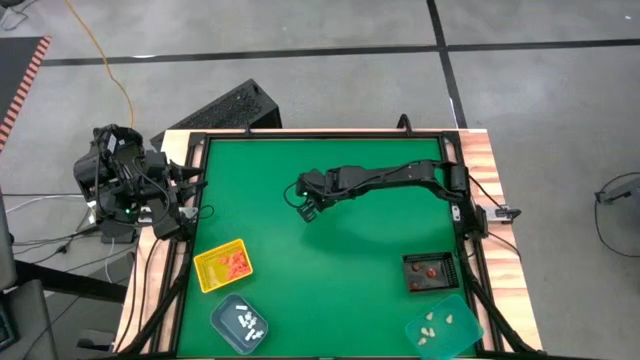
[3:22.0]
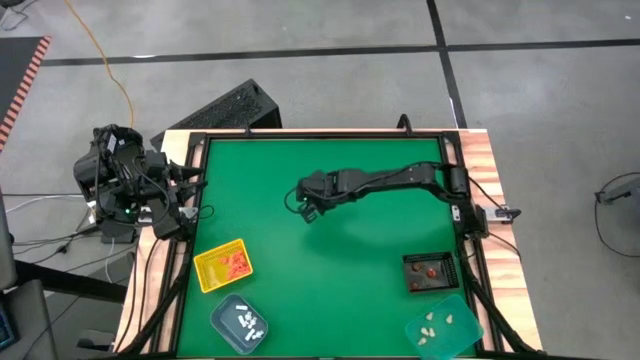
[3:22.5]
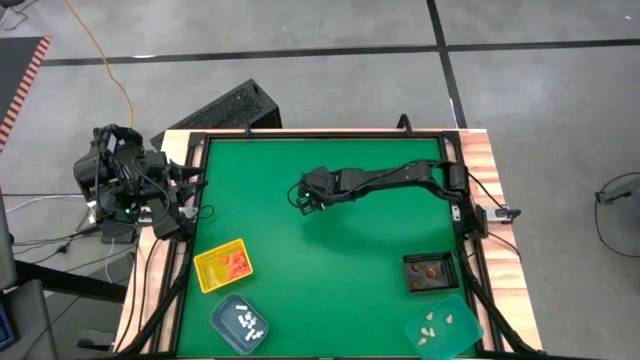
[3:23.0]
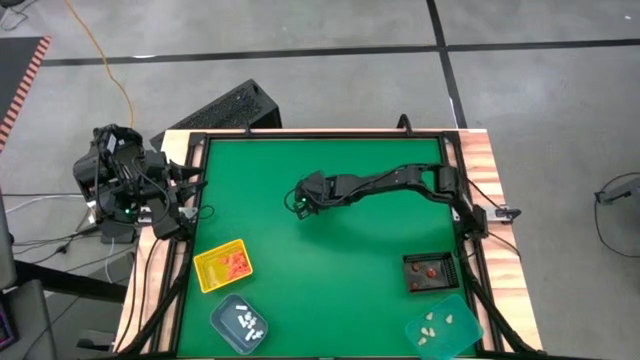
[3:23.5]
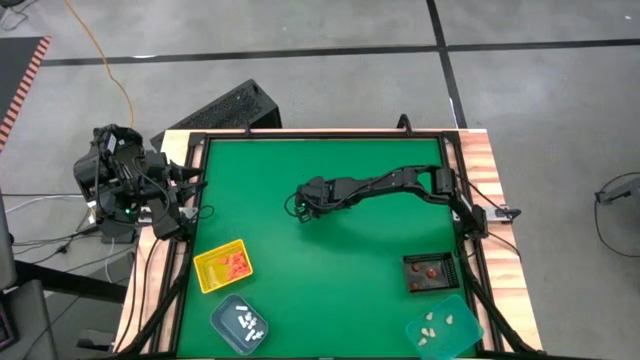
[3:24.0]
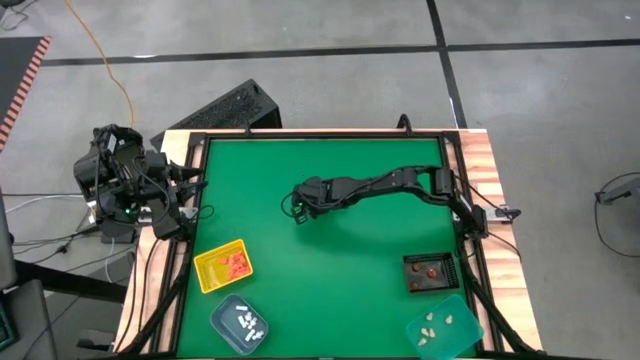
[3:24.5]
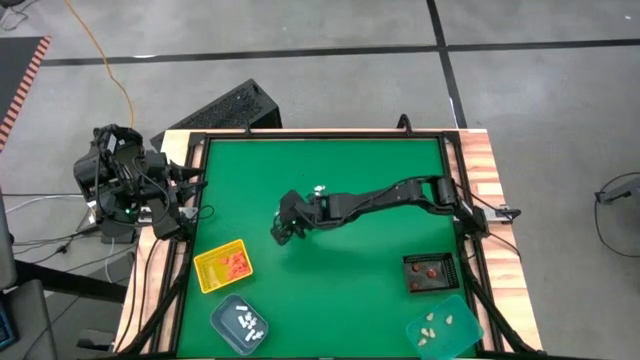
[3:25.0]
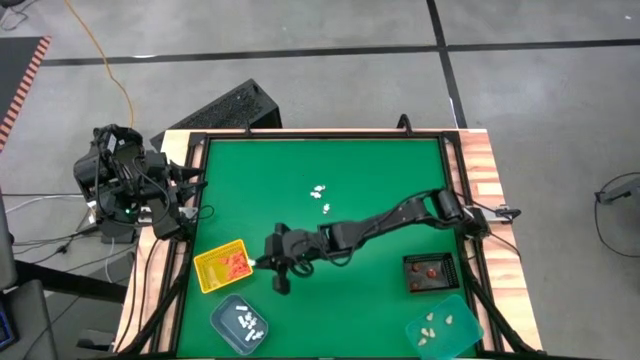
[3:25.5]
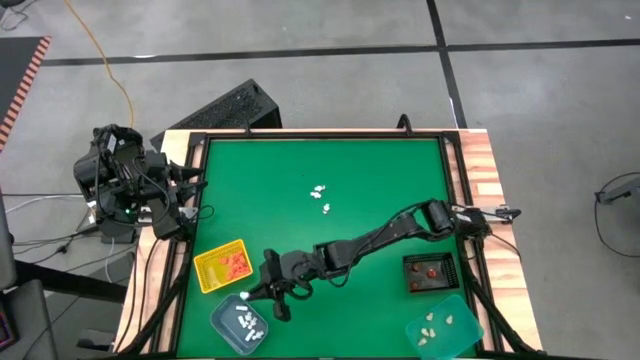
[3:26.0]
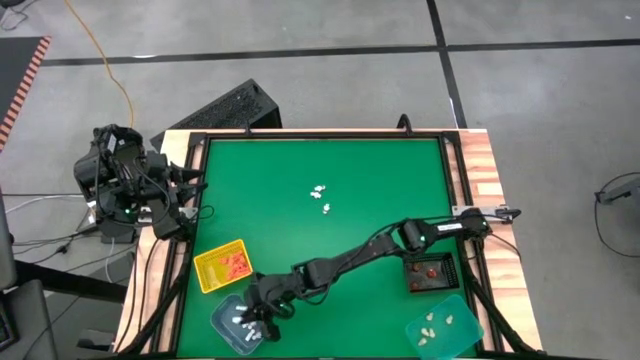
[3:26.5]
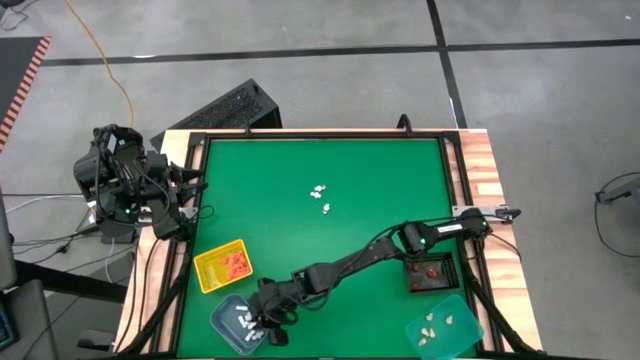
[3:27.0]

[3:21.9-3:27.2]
Task: Sort Halloween decoration
Put the white skeleton model into the blue bin

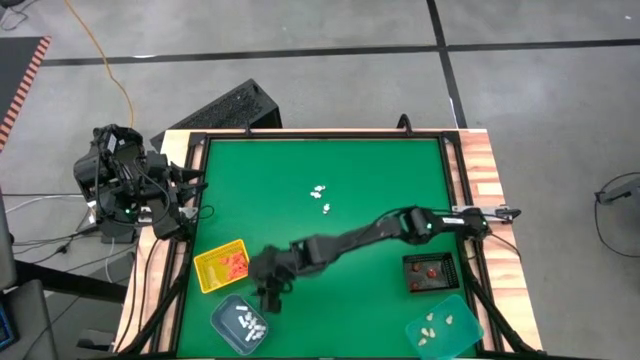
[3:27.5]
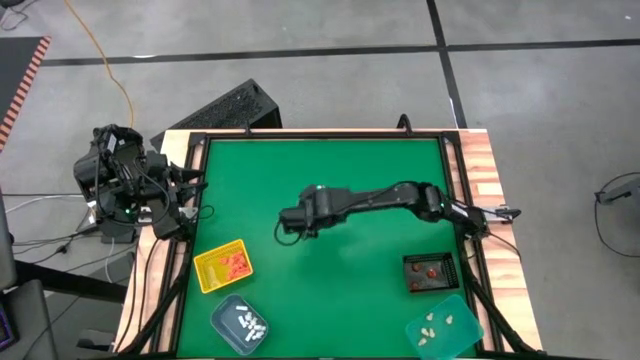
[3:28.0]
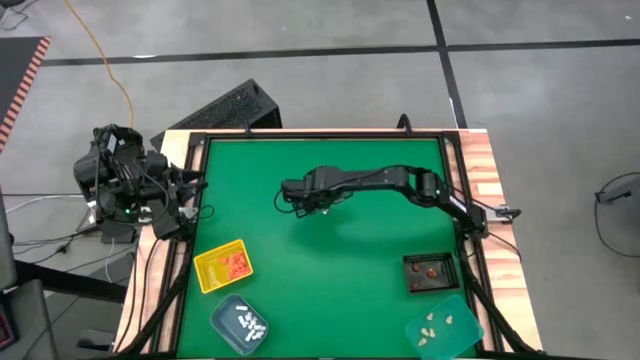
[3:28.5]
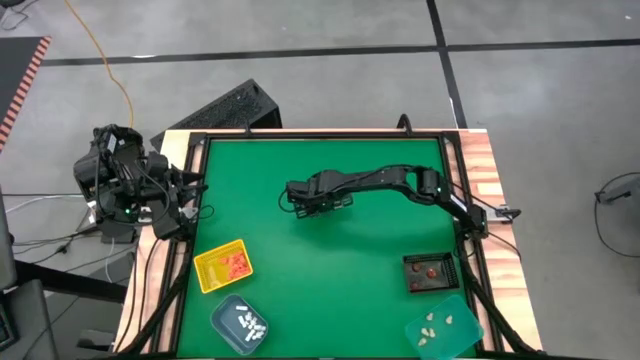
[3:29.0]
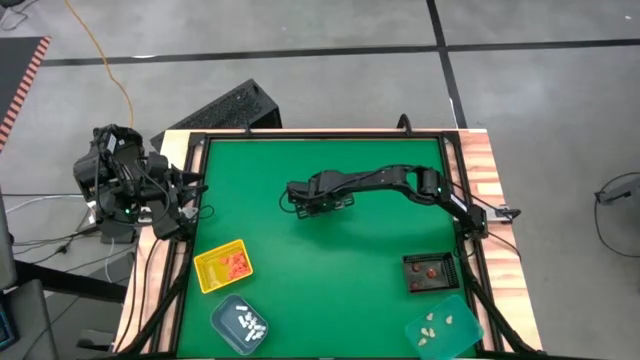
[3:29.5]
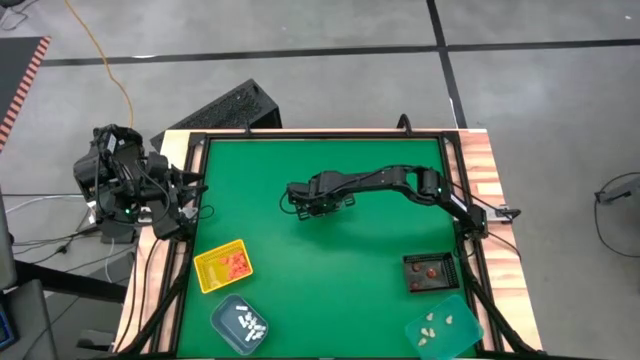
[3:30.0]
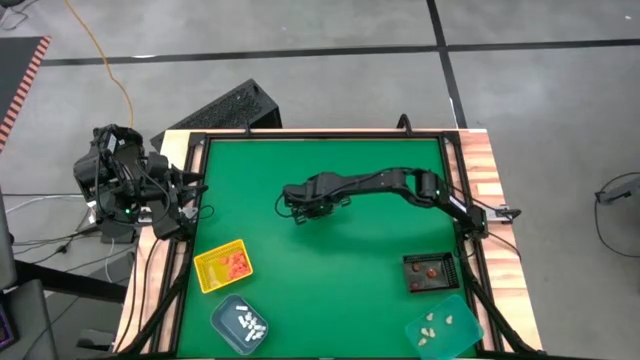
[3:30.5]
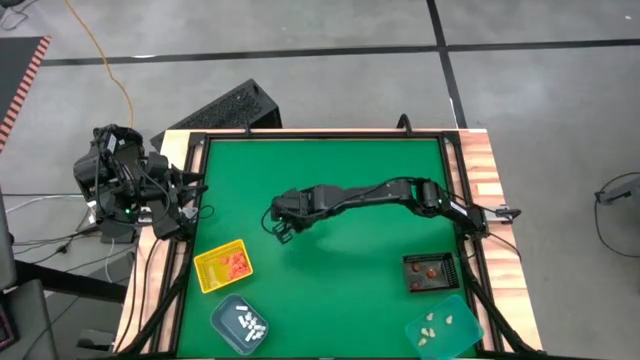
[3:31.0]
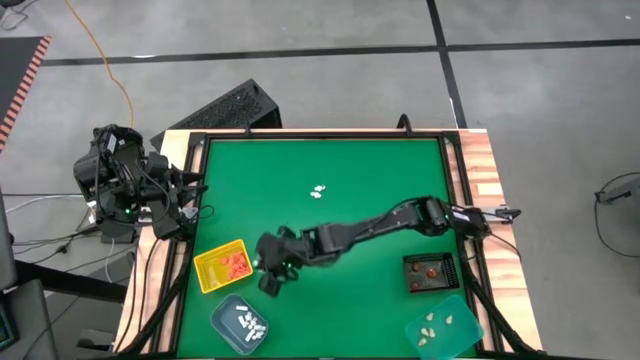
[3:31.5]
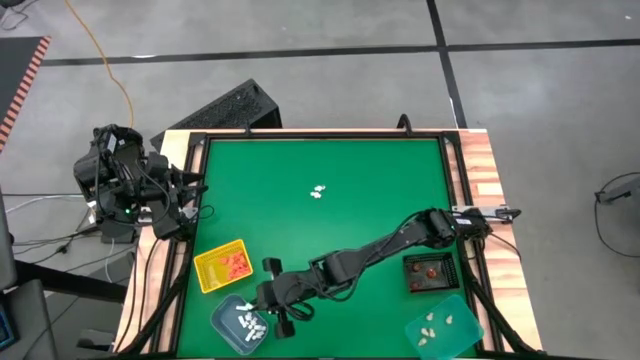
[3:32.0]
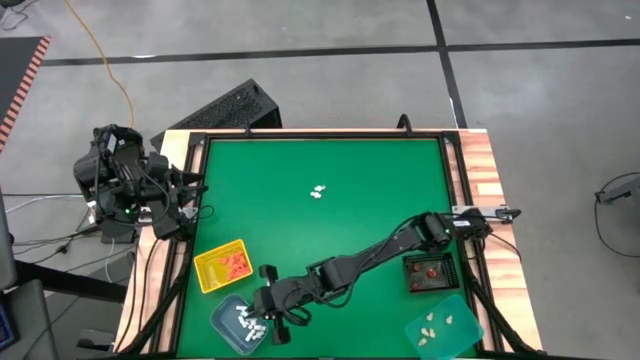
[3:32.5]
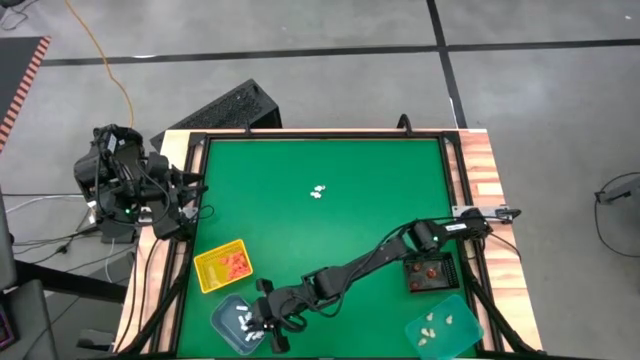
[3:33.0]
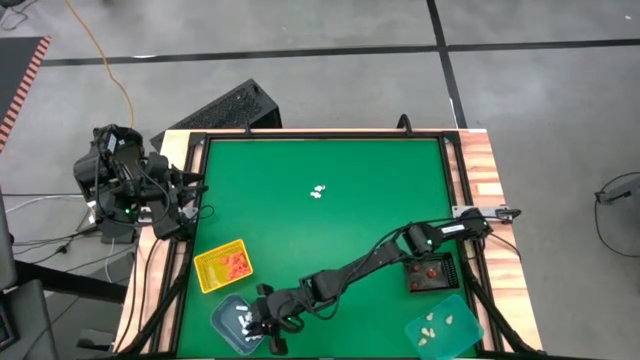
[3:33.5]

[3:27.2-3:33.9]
Put the bottom white skeleton model into the blue bin

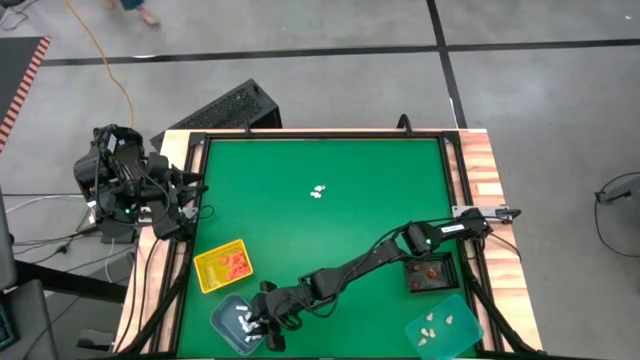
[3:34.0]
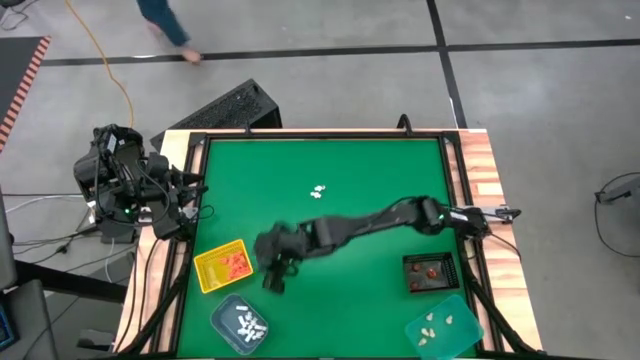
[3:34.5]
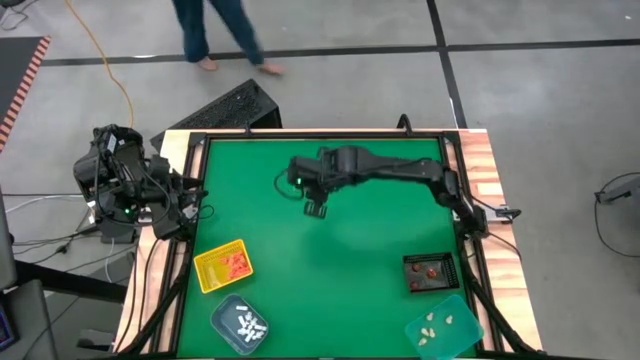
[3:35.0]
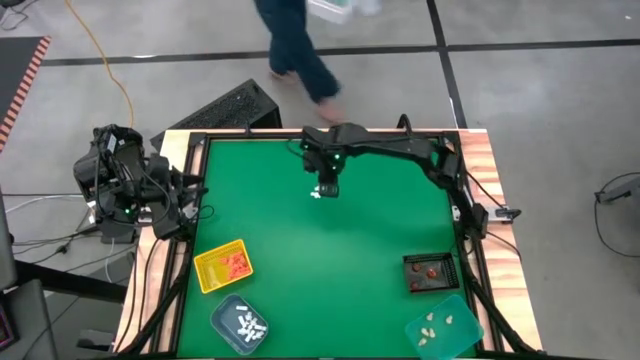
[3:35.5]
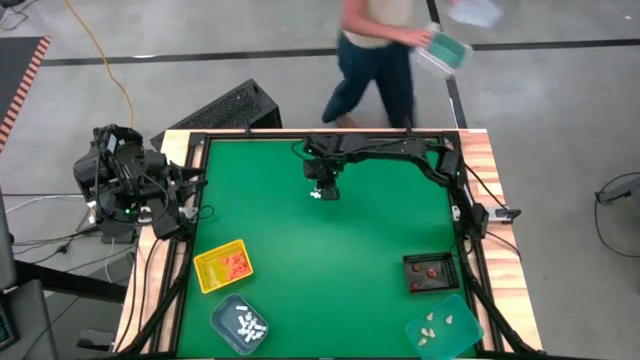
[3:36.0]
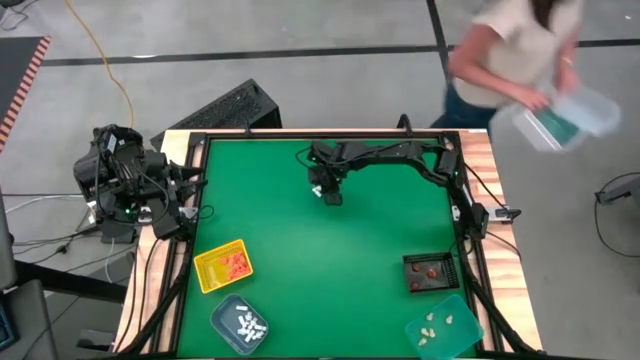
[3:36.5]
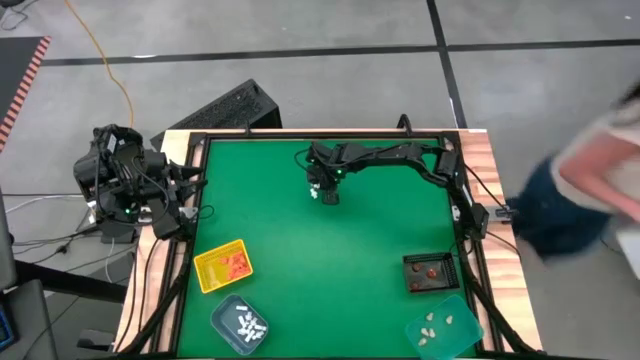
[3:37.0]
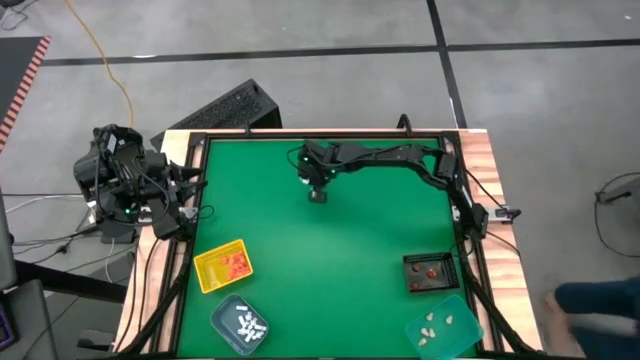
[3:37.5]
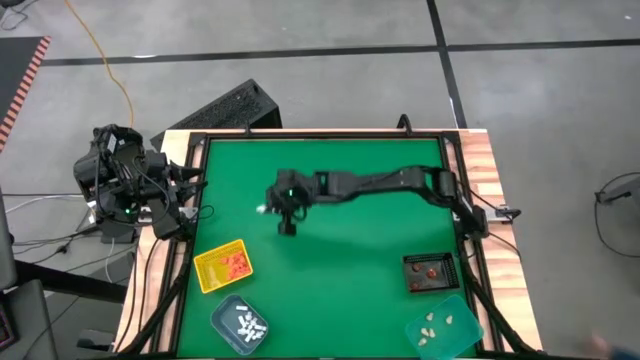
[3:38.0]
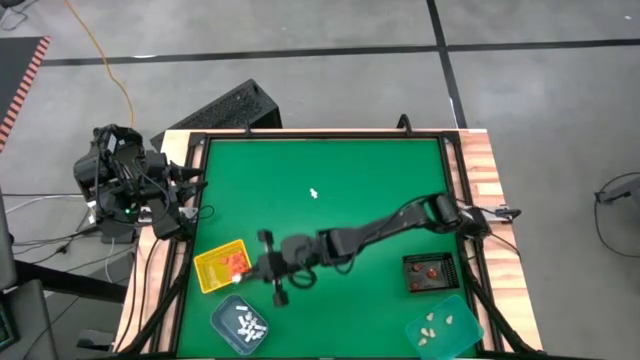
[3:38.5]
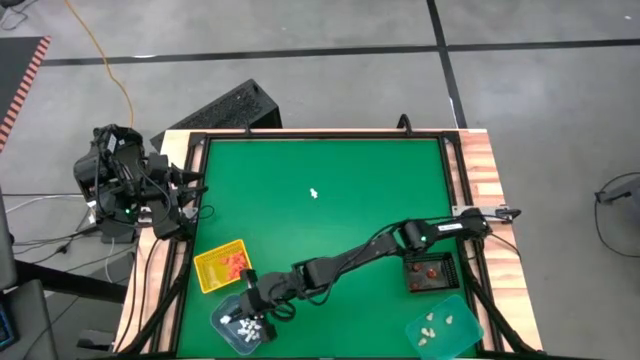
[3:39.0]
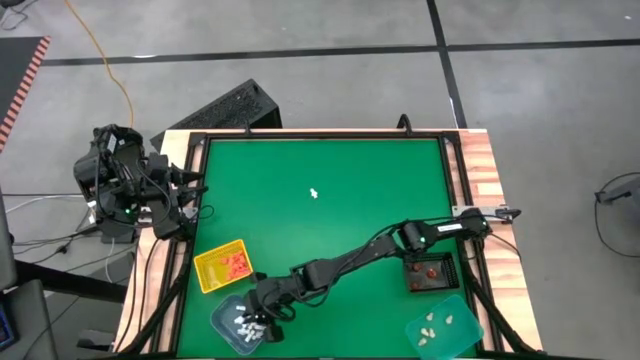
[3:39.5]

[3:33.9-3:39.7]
Put the top white skeleton model into the blue bin

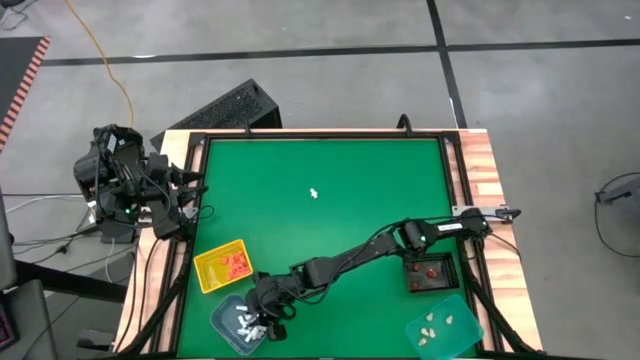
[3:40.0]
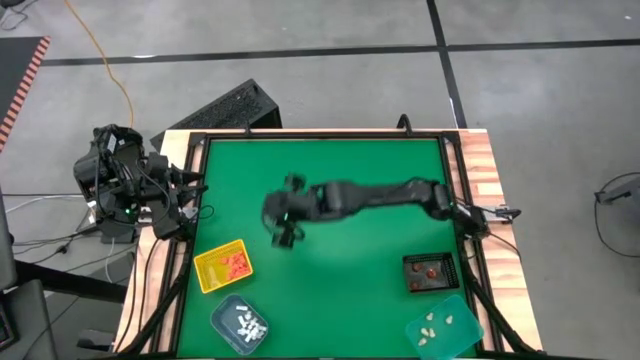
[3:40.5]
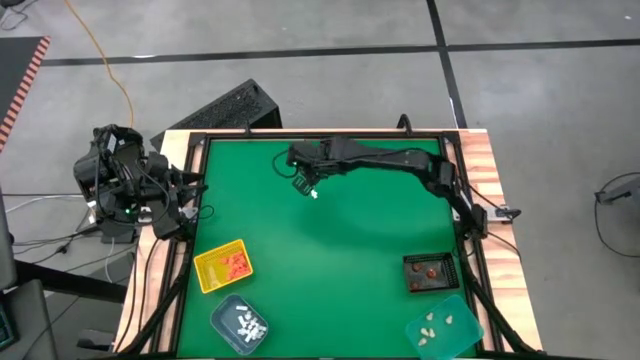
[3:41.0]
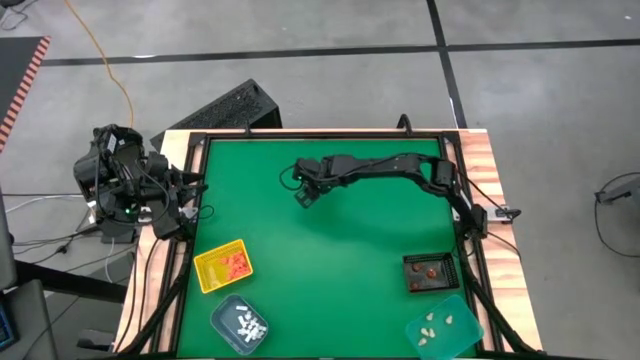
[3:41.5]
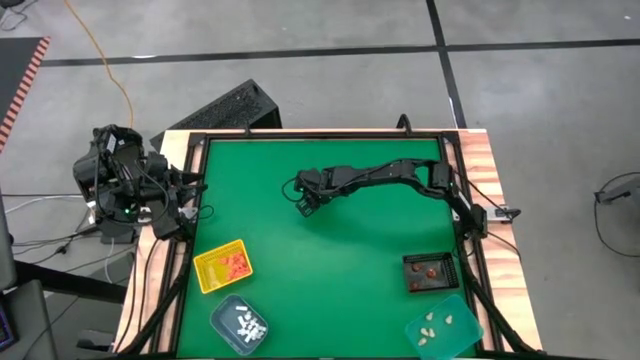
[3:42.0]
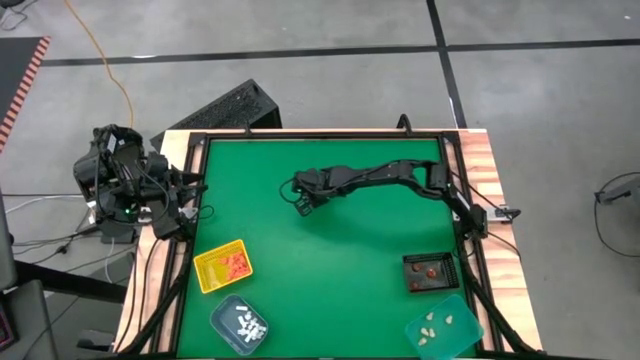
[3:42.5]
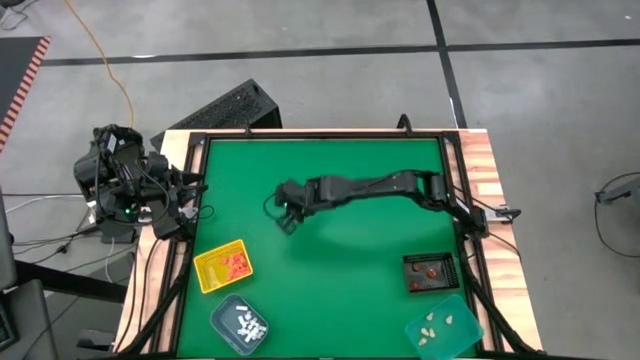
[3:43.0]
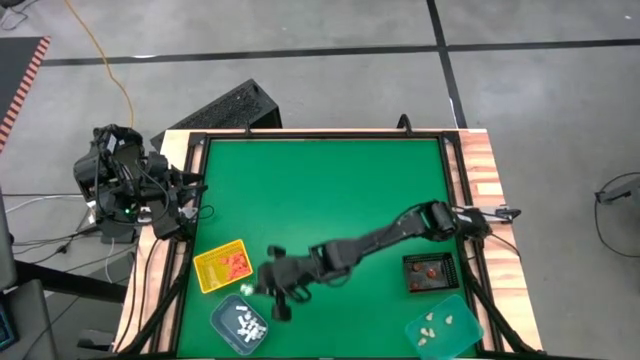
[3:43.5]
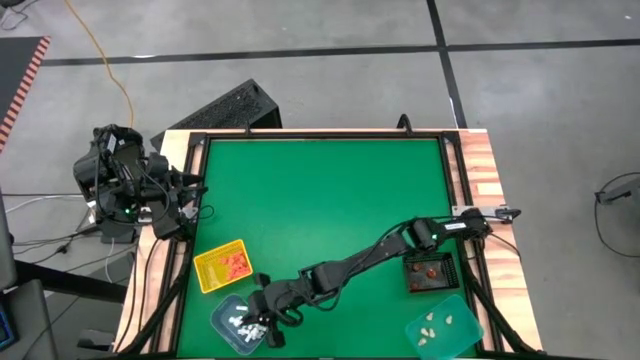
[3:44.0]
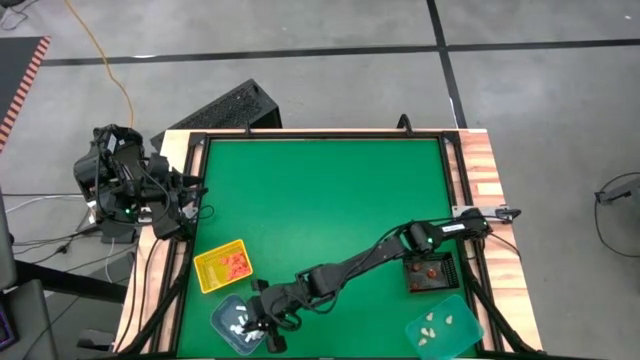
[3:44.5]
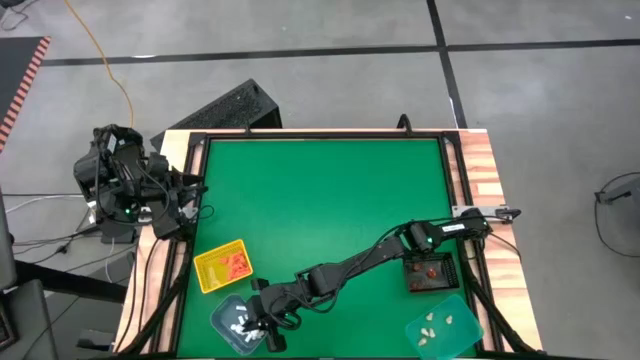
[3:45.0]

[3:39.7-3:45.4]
Put the white skeleton model into the blue bin
